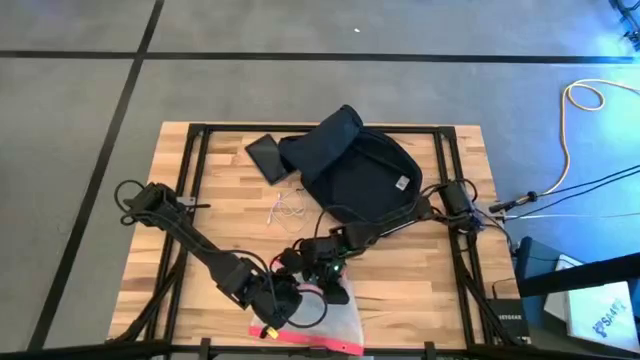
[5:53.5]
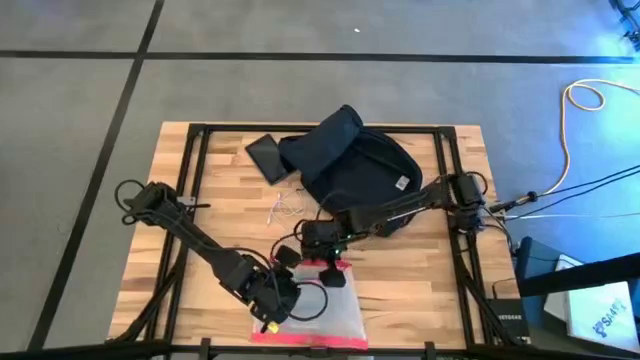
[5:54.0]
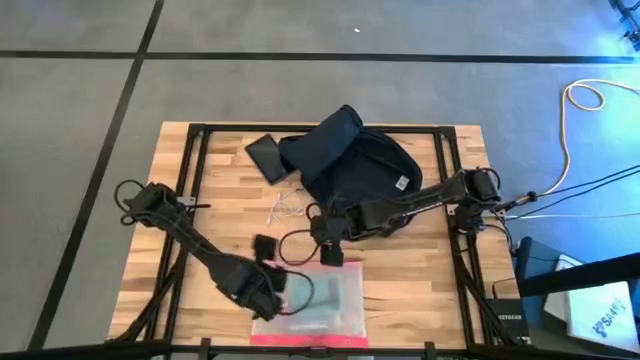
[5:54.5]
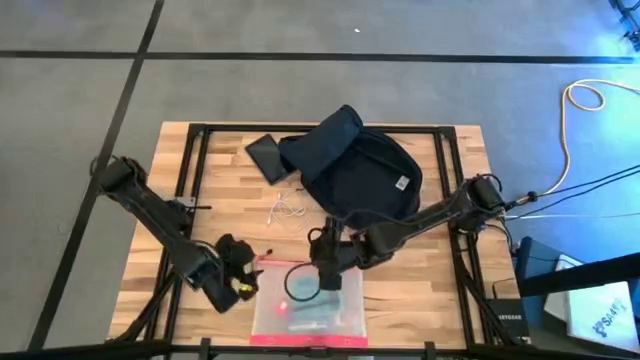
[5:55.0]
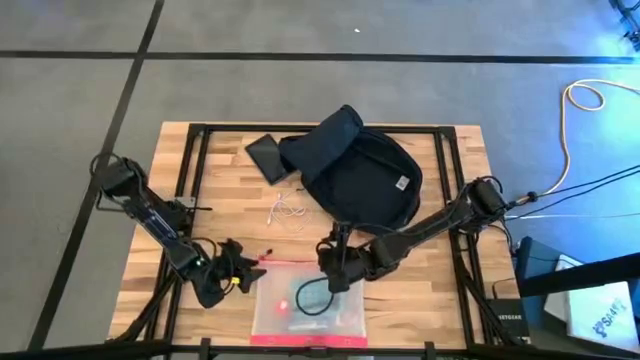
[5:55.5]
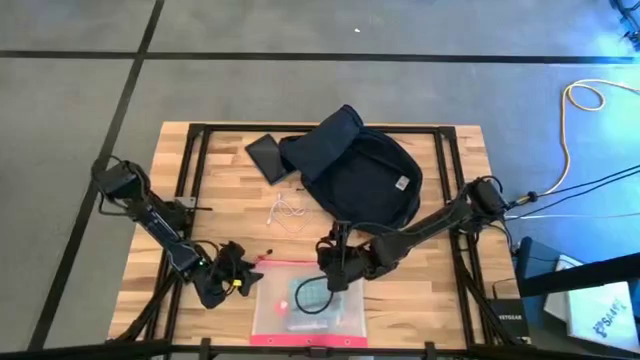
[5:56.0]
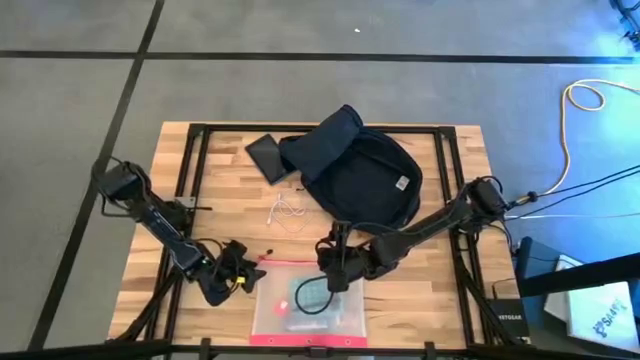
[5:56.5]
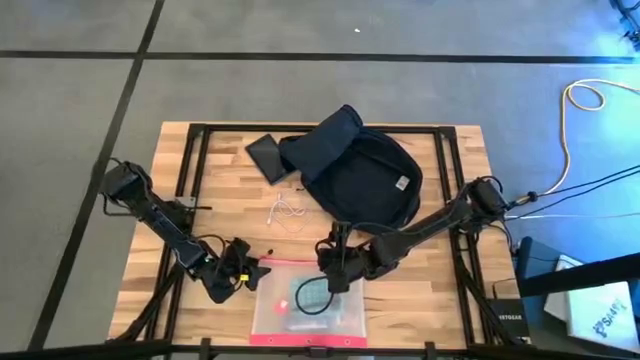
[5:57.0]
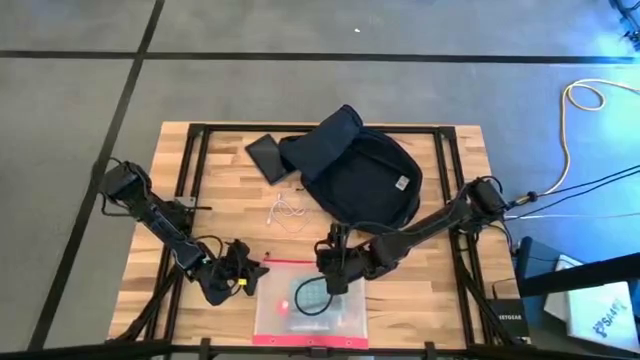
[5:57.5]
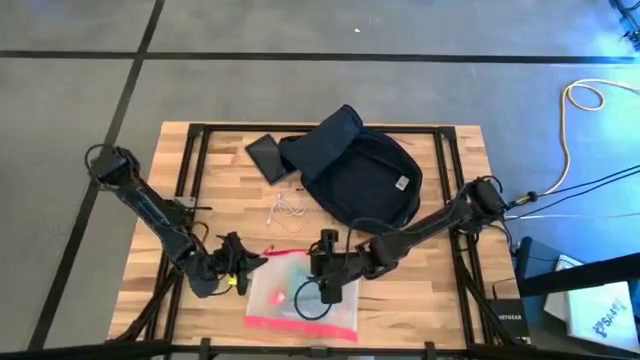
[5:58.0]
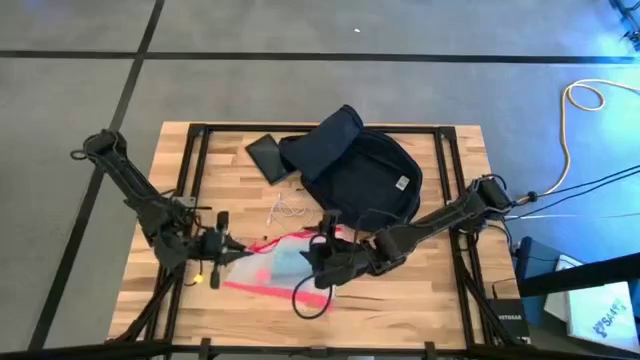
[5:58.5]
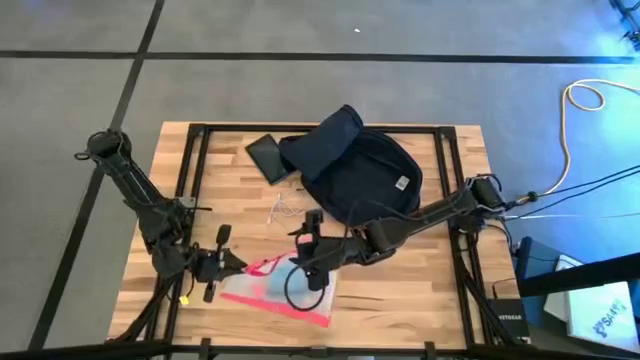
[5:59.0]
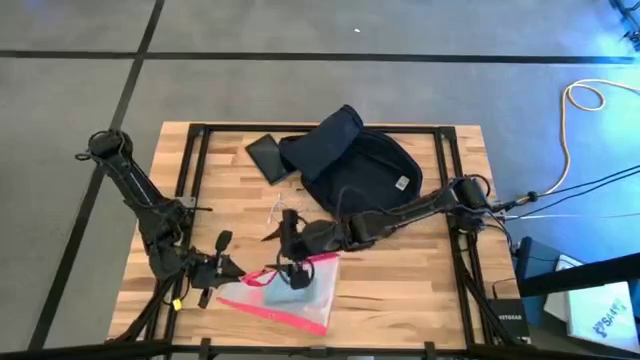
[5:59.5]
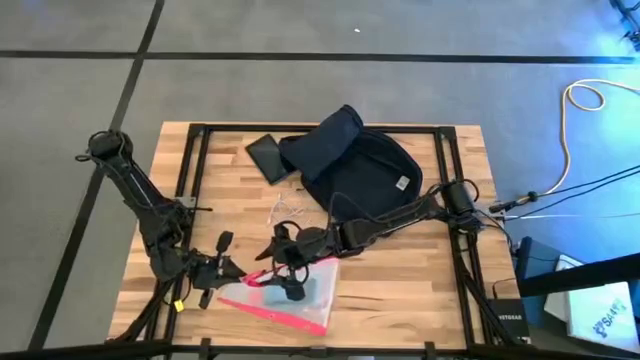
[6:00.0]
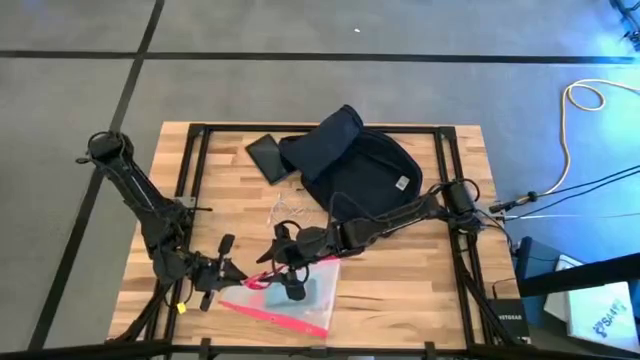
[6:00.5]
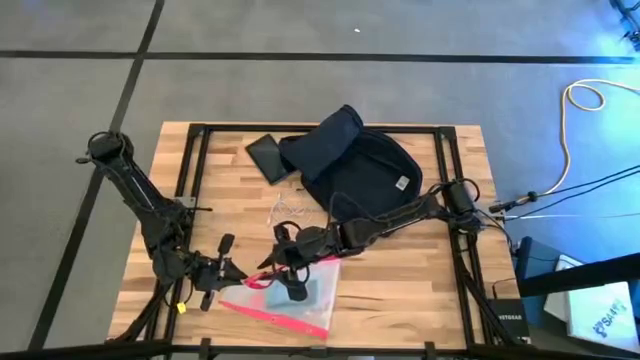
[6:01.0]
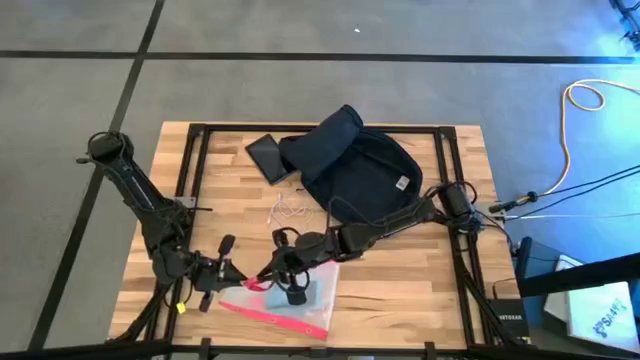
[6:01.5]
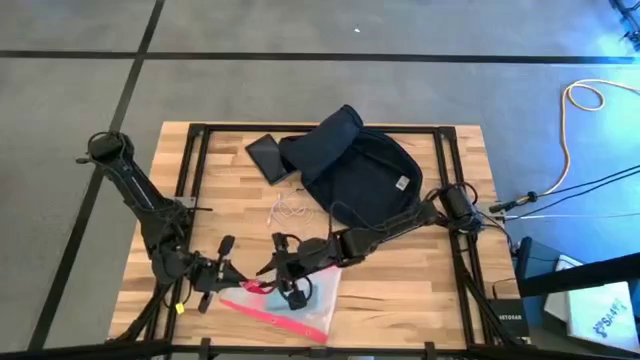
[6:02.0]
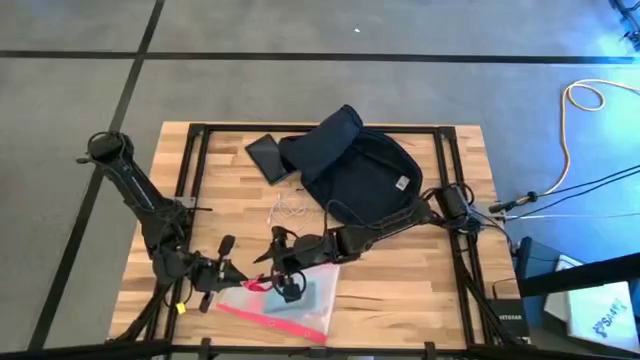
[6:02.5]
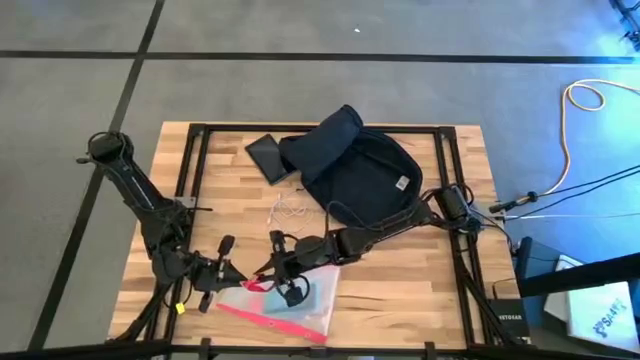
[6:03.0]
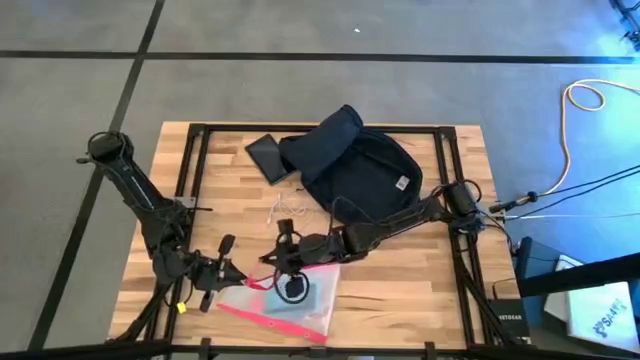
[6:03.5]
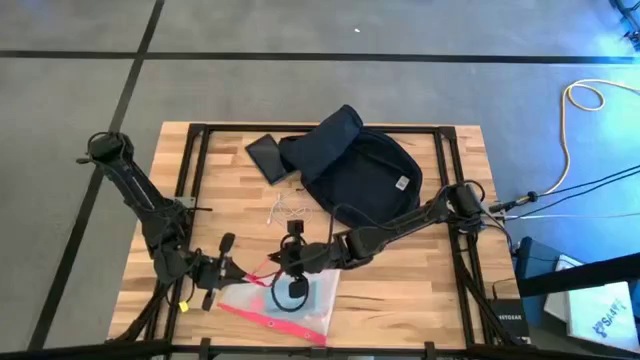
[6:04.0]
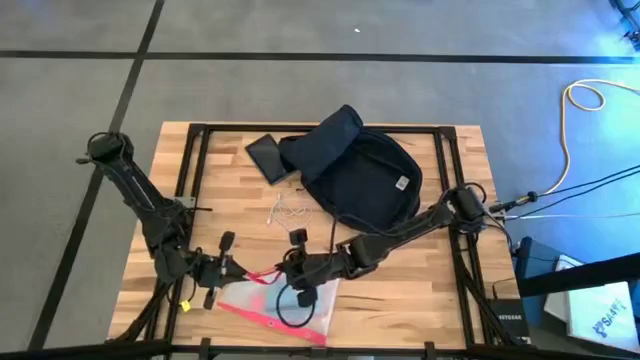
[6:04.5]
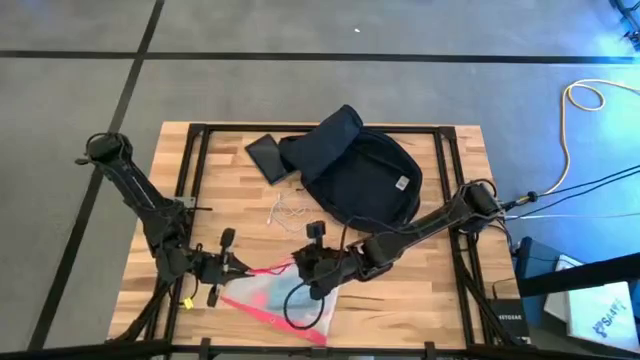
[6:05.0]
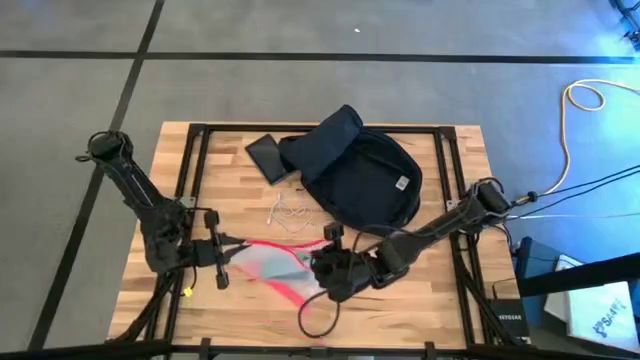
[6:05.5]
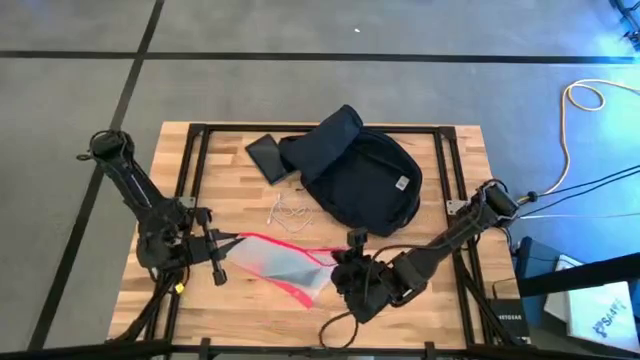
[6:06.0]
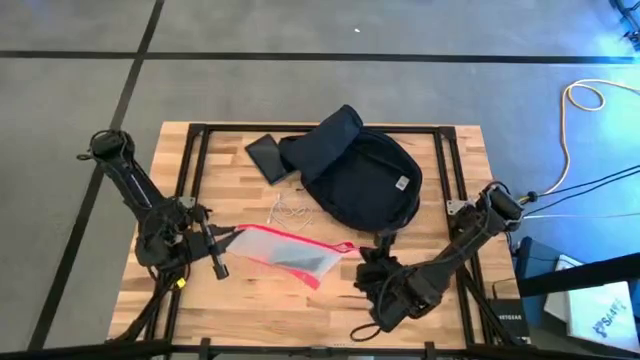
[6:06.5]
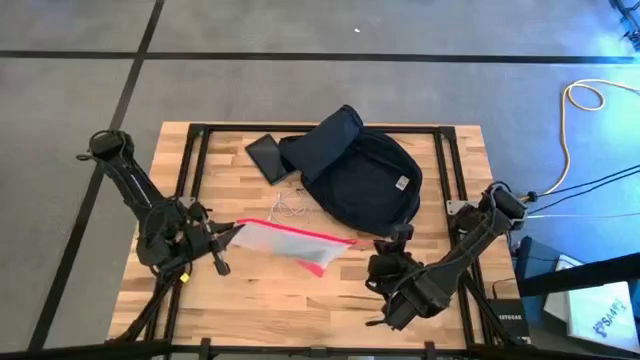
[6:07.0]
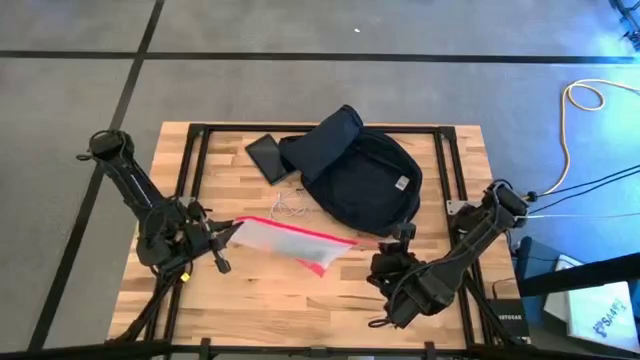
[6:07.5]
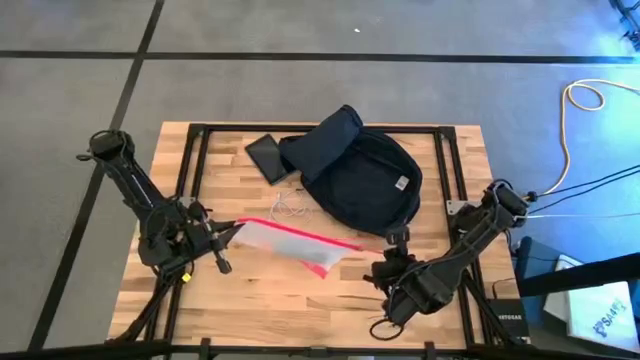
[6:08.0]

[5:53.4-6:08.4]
Task: Unpack backpack
Close the transparent zip bag

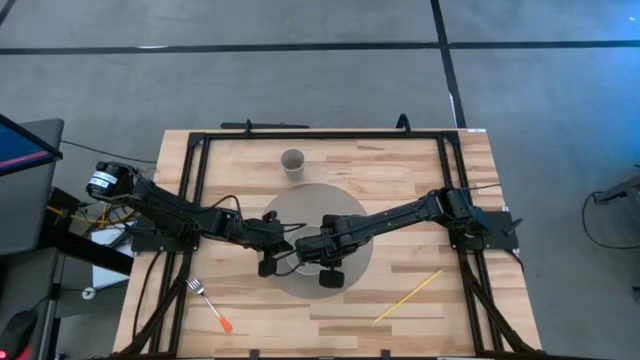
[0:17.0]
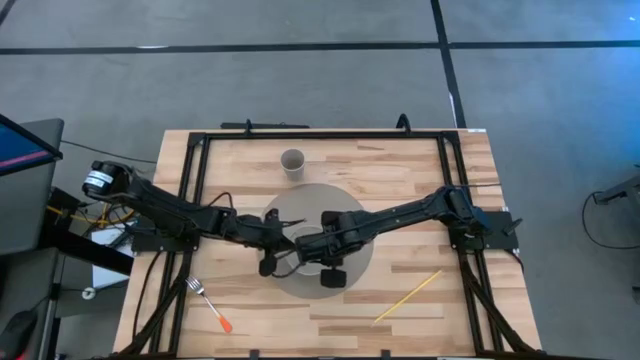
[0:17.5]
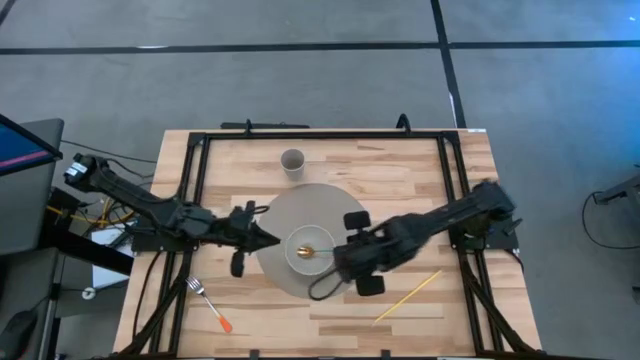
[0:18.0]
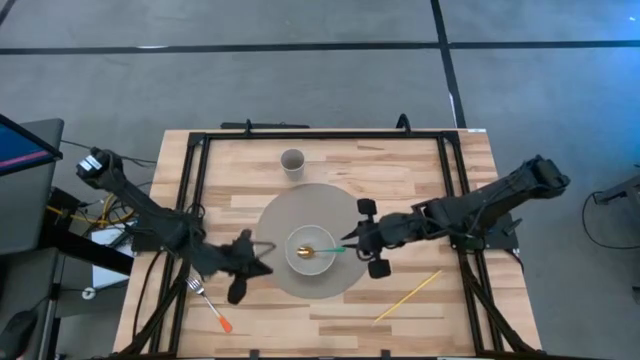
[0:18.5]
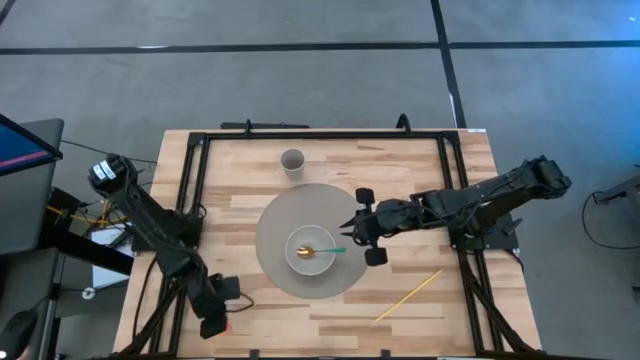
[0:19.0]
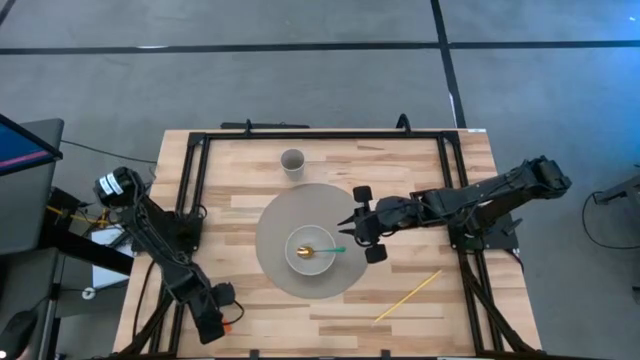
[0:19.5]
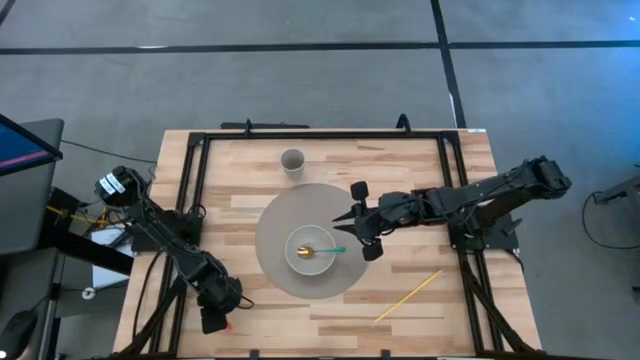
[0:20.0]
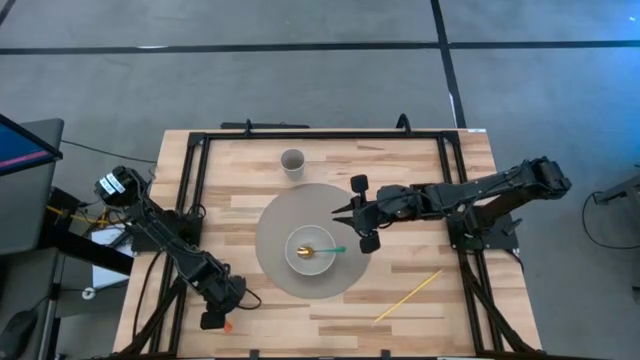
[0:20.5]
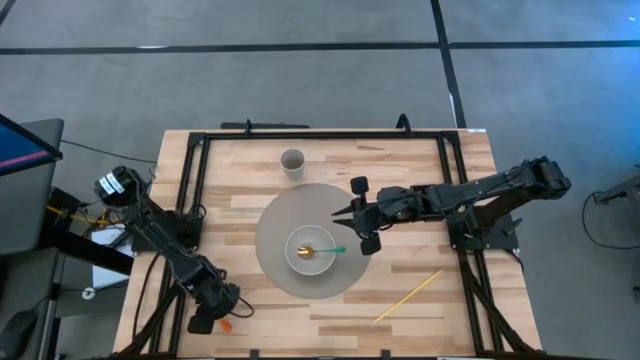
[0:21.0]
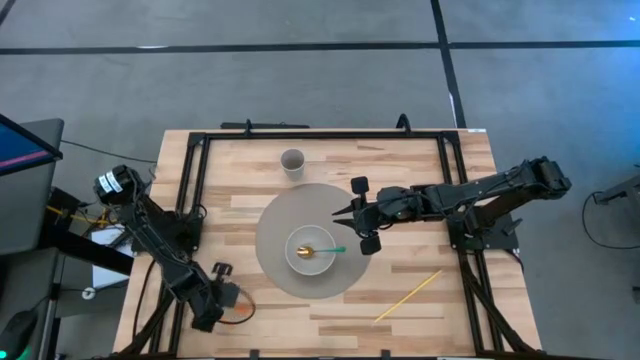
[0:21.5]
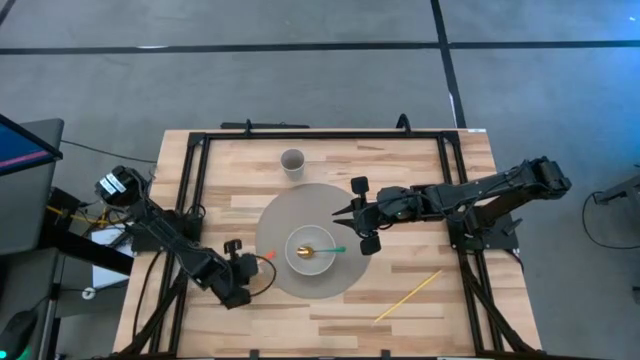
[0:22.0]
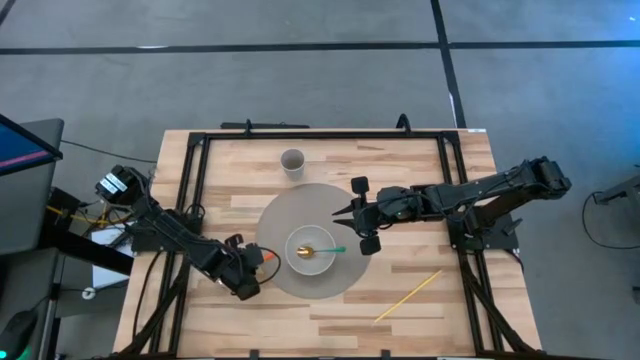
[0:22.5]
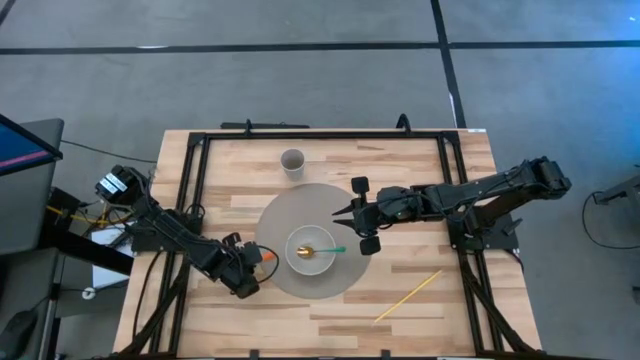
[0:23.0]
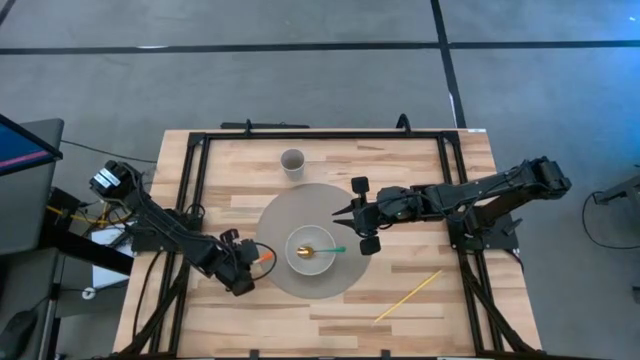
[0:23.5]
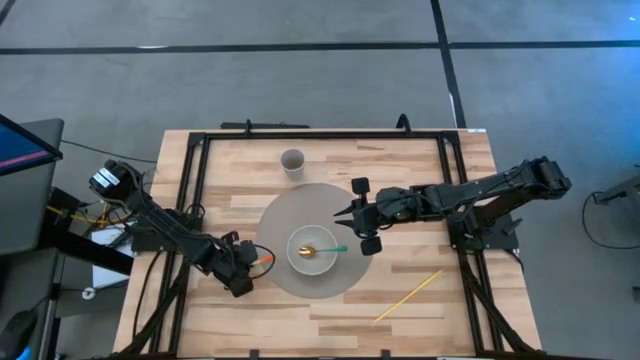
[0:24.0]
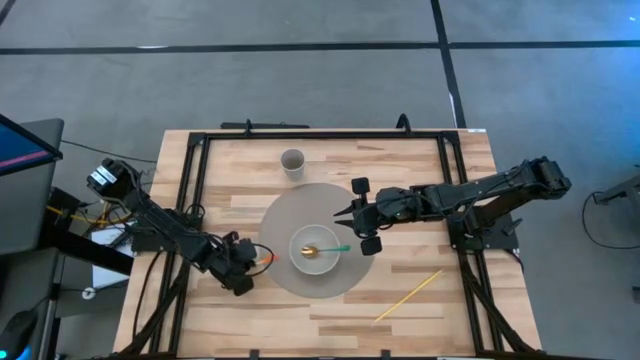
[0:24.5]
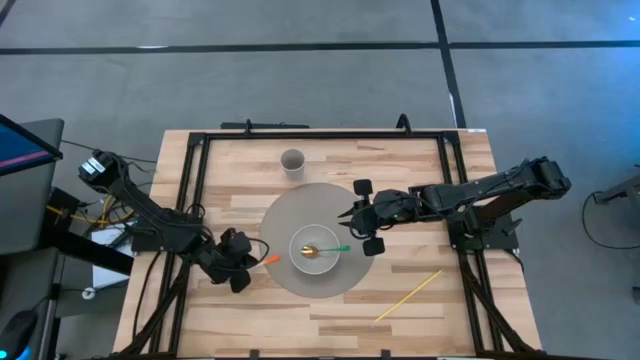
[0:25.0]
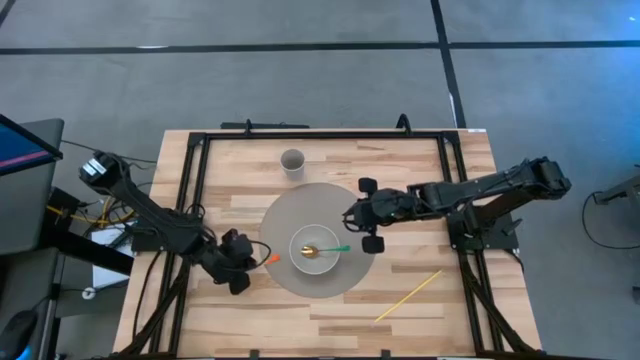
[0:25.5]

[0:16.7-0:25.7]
Task: Pick & Place Utensil
Put the orange fork into the gray bowl on the placemat
